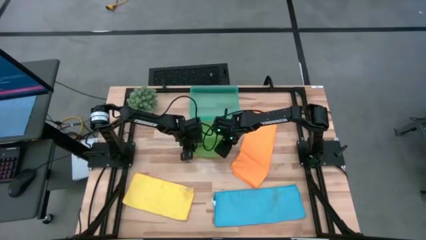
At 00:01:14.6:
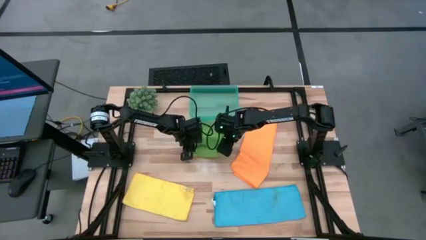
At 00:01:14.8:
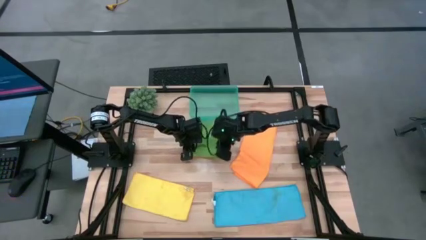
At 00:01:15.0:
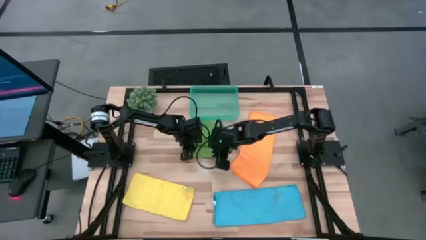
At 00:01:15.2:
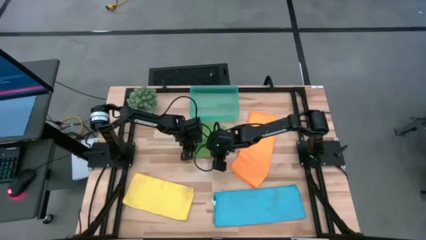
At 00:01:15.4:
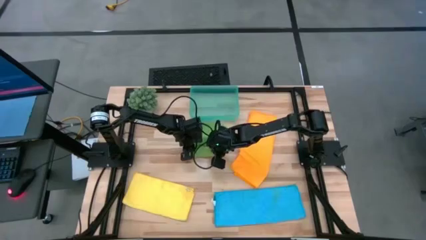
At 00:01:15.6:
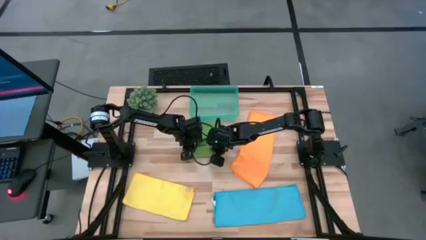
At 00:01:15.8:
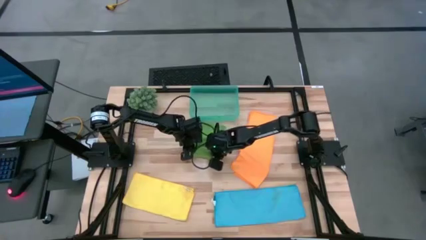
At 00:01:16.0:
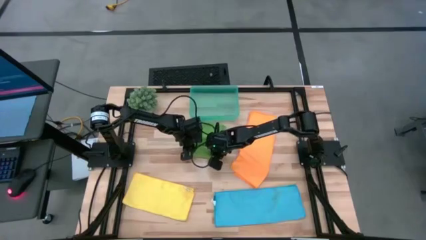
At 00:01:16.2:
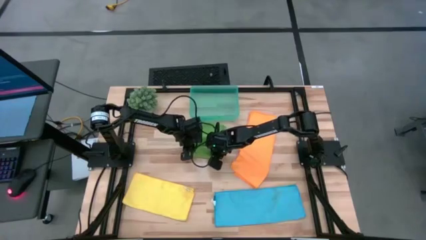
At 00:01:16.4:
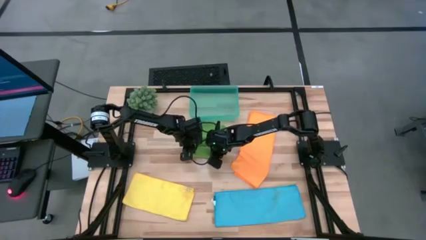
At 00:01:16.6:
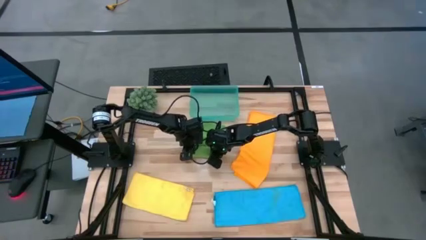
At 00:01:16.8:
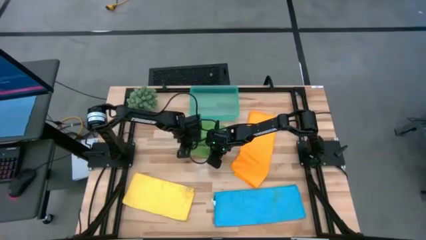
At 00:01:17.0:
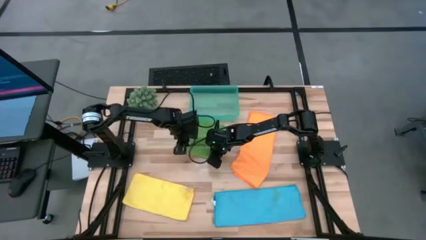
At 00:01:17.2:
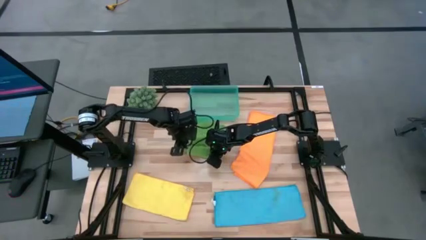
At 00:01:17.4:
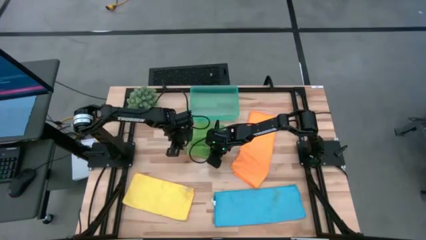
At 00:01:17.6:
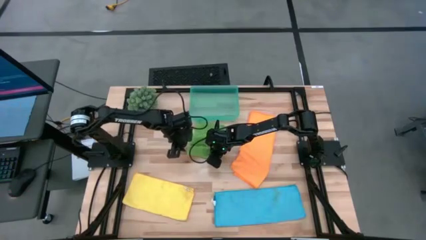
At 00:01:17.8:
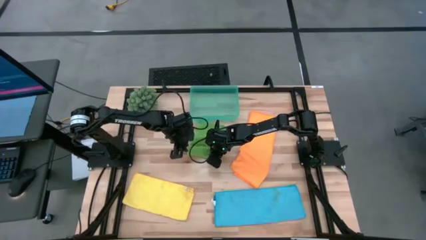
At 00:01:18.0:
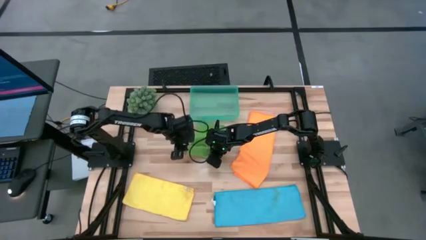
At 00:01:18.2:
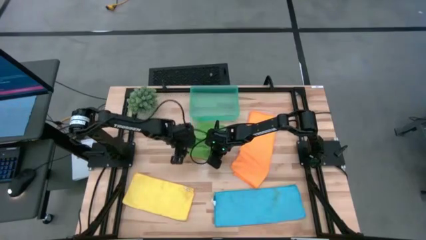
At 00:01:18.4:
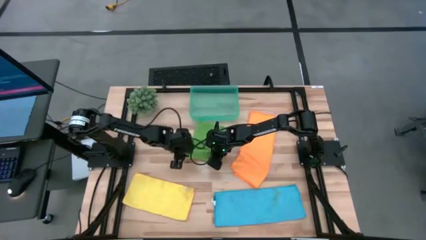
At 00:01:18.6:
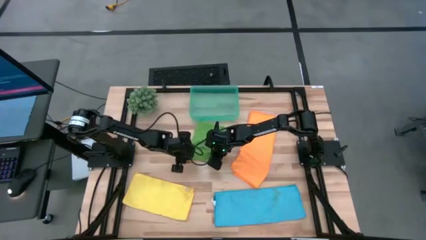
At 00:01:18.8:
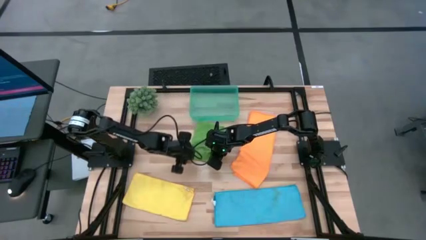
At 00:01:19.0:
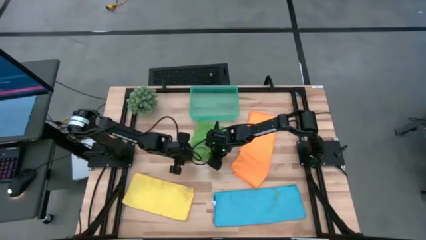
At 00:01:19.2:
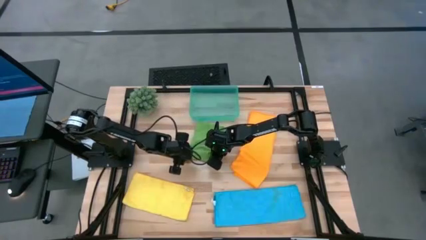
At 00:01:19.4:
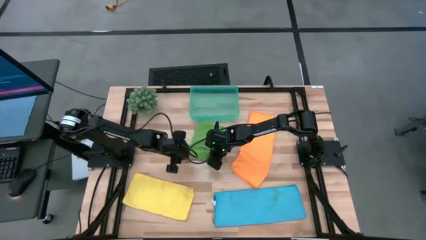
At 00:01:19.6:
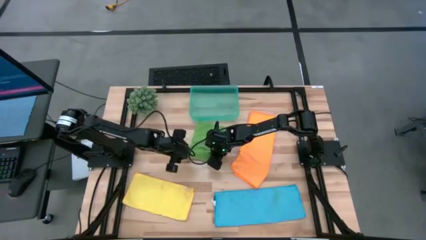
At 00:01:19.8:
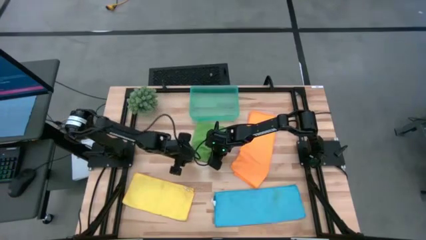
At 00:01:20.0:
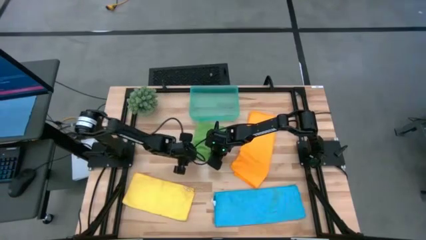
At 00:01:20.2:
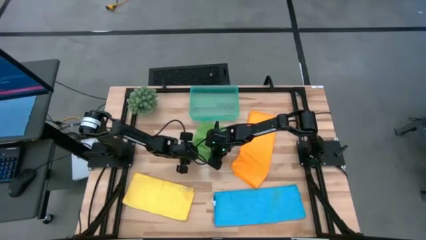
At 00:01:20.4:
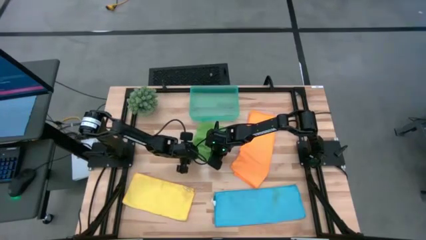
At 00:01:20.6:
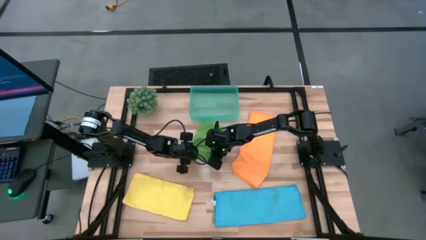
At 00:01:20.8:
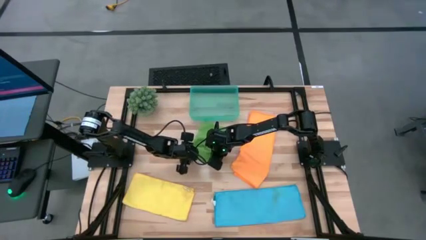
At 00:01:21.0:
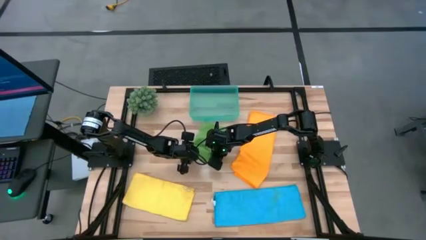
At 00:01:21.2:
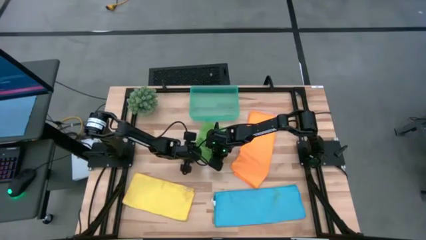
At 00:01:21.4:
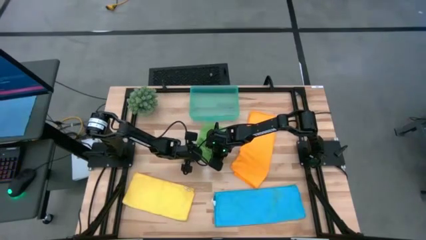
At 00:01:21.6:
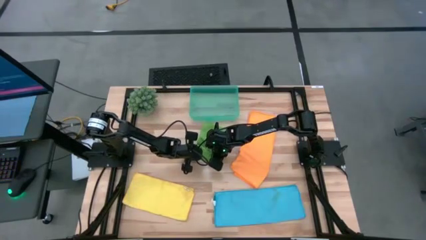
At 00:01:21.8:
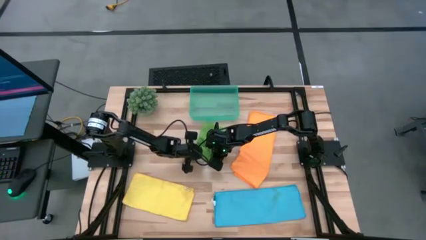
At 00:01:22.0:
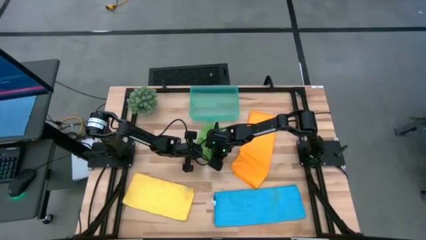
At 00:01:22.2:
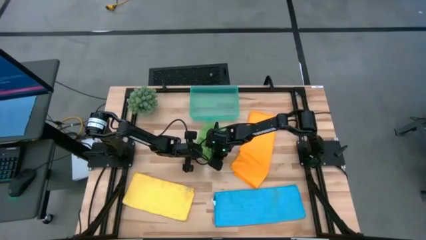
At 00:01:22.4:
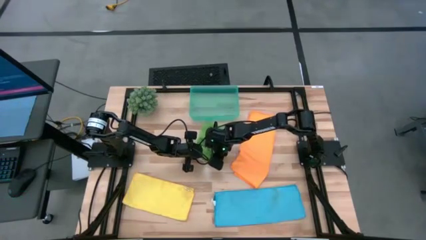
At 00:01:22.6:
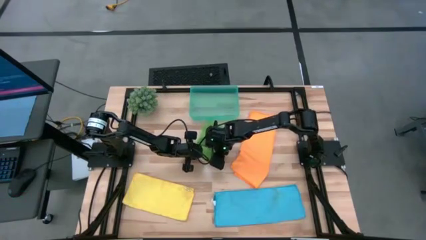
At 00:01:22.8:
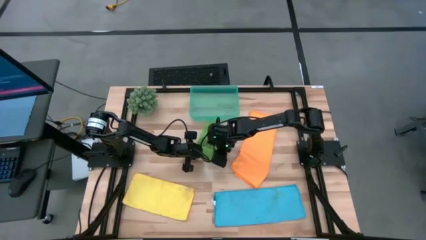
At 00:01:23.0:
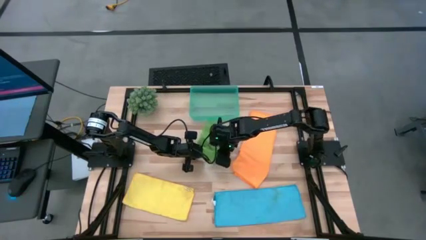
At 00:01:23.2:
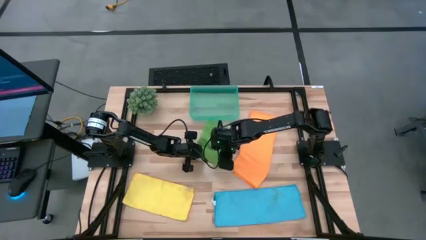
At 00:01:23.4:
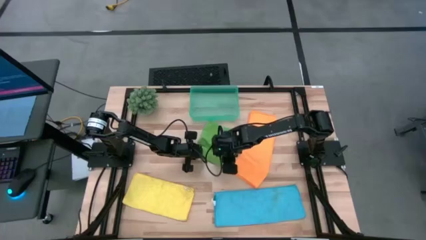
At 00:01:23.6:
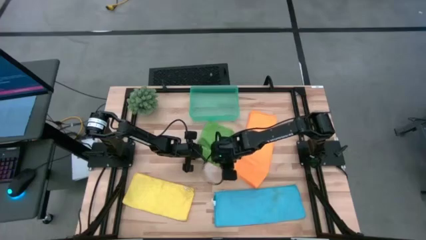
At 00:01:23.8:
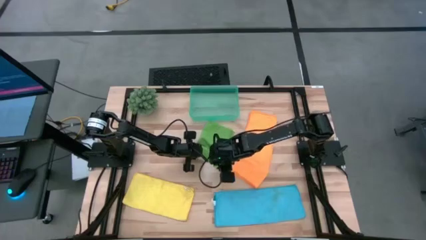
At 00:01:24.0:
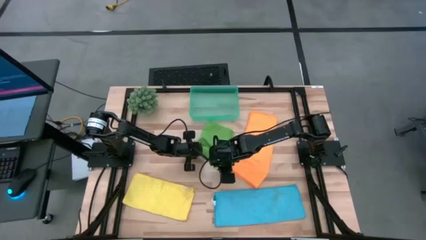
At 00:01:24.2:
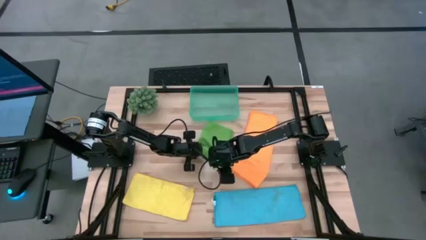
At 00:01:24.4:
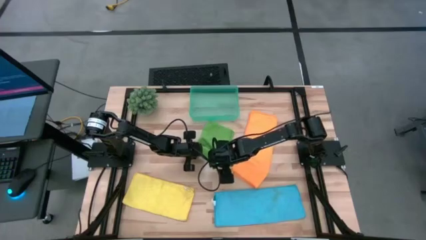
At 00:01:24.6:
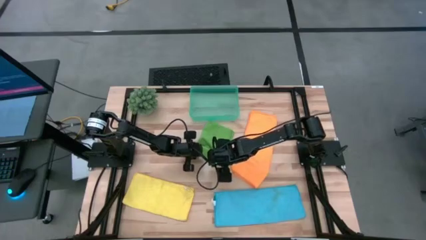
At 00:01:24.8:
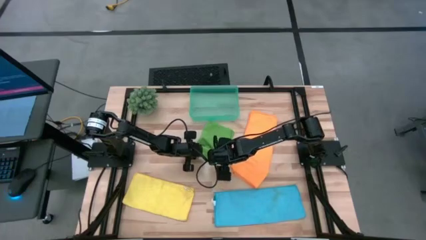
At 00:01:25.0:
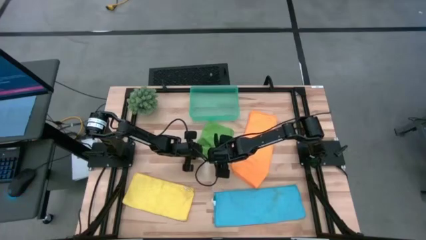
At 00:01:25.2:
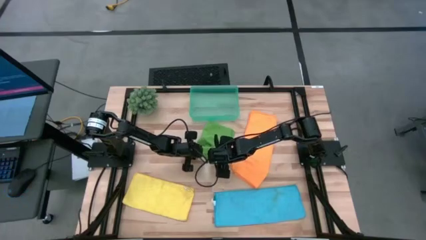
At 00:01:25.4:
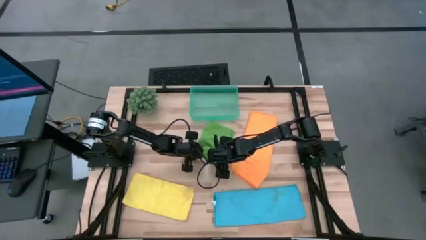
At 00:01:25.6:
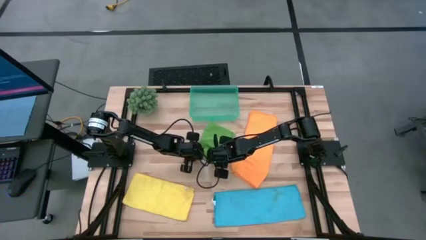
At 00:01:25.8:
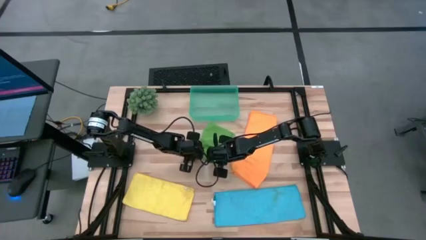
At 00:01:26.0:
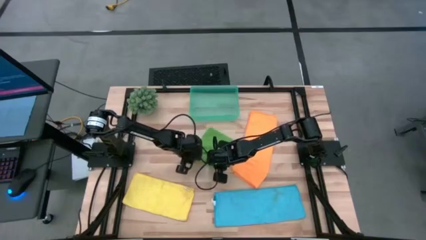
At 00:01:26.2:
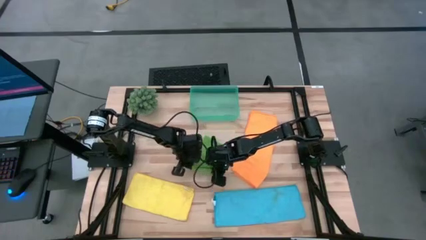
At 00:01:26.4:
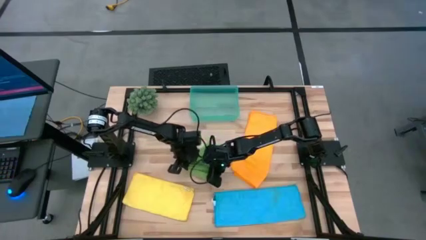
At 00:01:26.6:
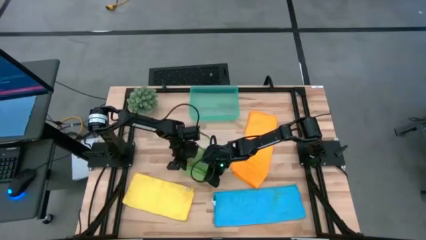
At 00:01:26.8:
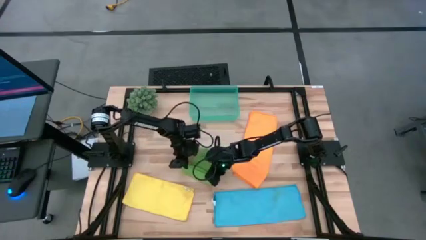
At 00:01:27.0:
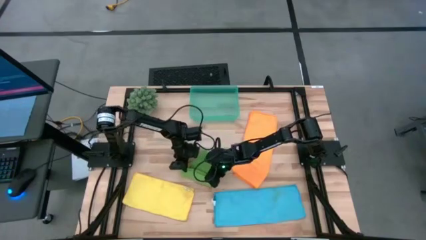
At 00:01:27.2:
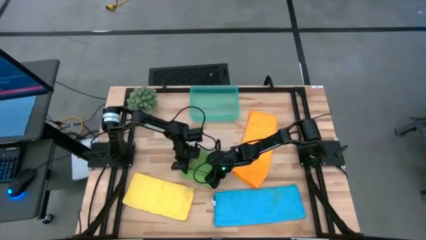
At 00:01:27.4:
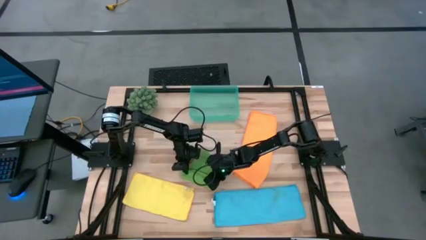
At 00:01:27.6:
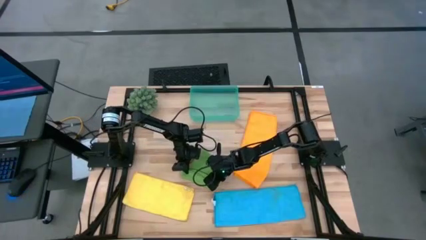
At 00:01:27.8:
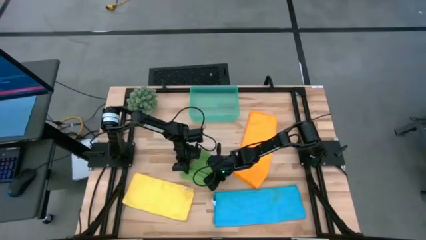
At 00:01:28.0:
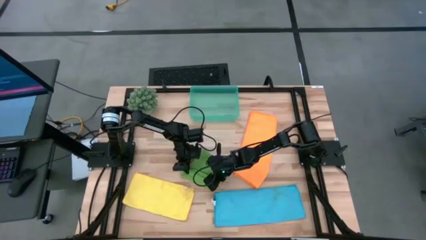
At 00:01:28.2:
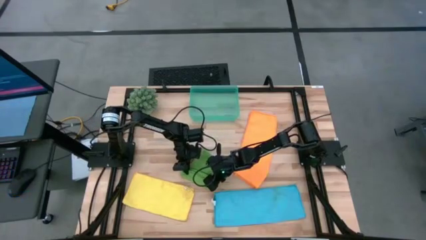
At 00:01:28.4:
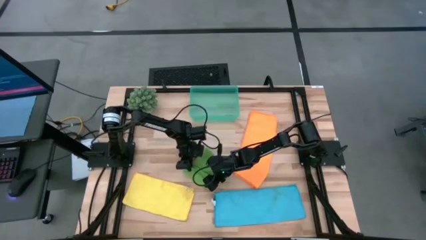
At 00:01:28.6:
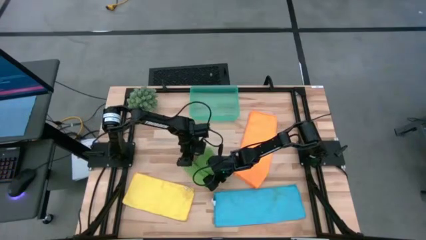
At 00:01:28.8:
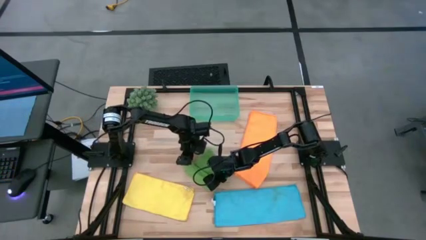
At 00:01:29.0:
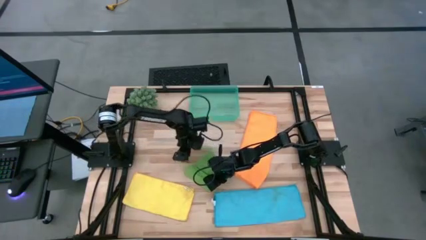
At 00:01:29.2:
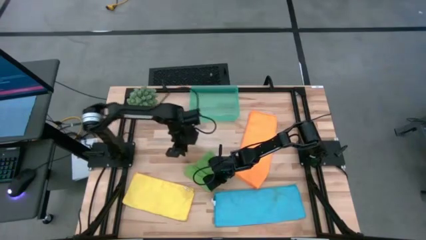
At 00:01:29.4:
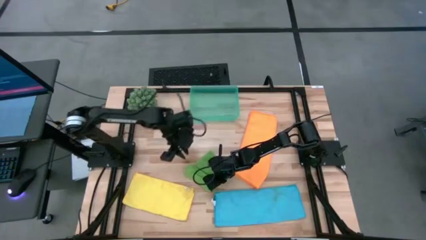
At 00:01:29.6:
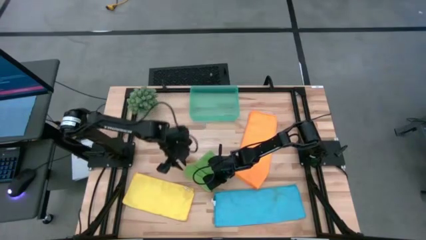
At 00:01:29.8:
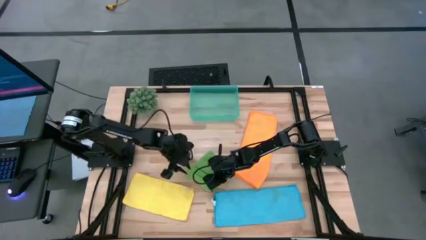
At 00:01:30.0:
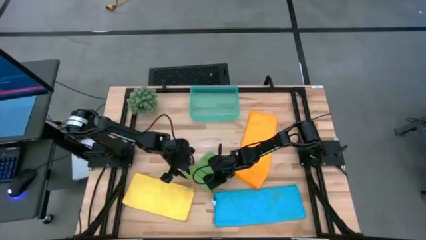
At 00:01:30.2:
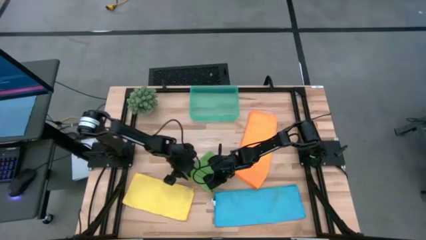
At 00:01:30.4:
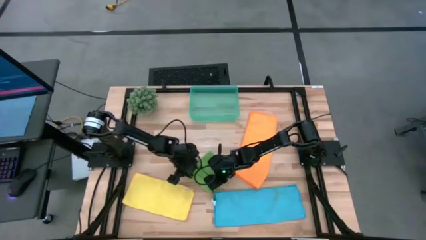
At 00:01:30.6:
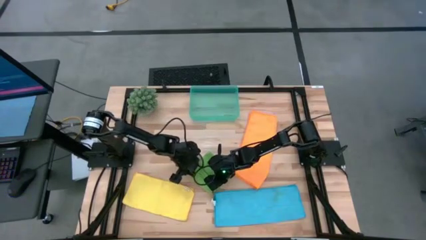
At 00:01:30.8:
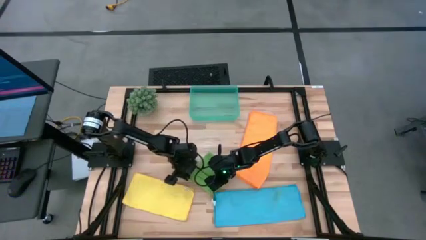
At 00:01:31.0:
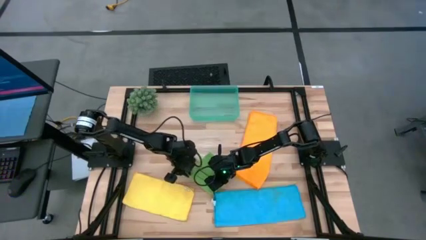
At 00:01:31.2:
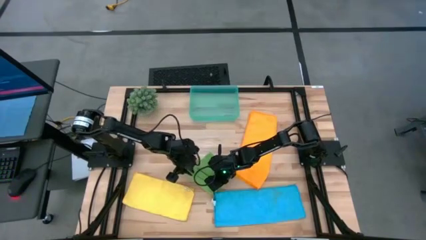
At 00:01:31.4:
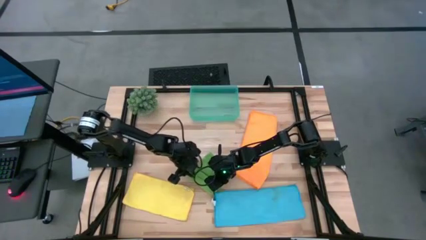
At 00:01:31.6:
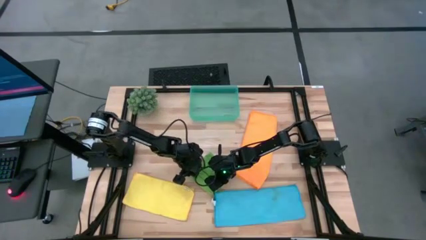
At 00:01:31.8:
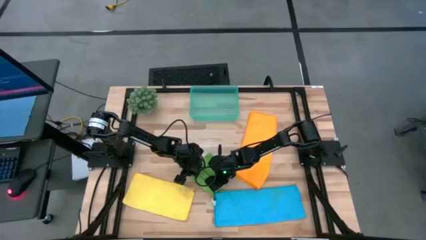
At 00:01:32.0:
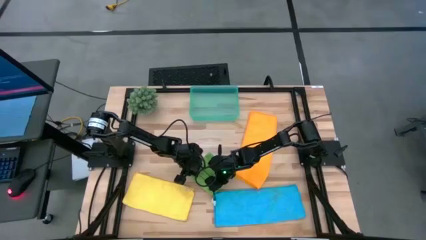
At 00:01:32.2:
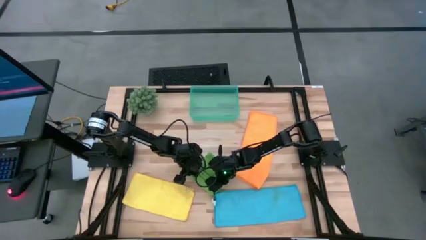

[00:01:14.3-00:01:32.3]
Task: Roll microfiber towels into tight, uniform cylinder then place into a basket
Roll the green towel
